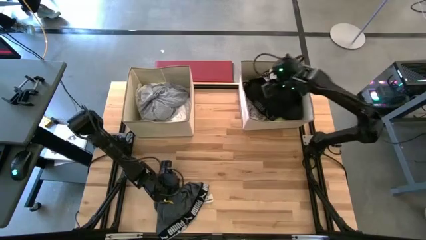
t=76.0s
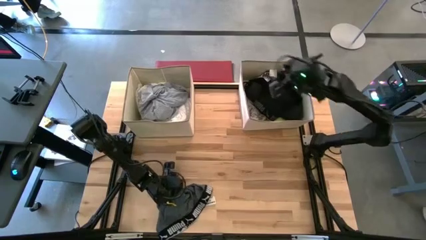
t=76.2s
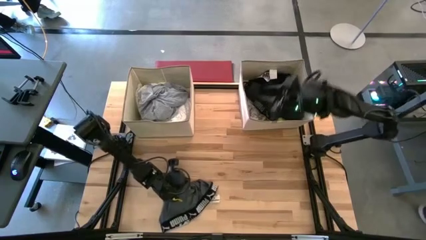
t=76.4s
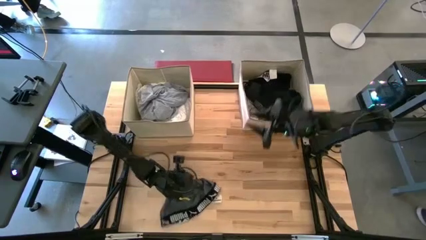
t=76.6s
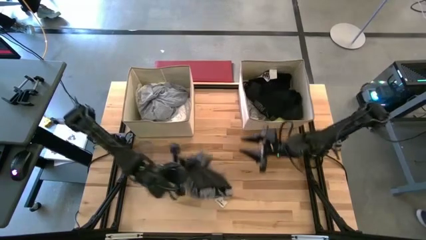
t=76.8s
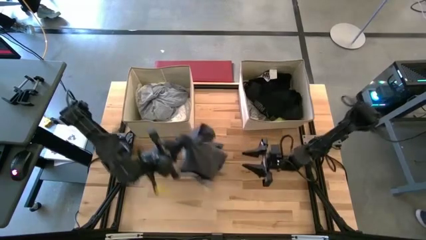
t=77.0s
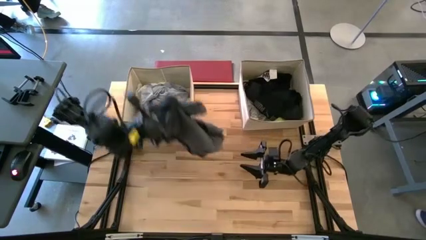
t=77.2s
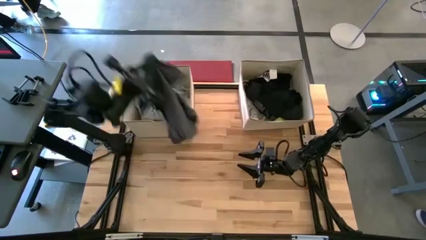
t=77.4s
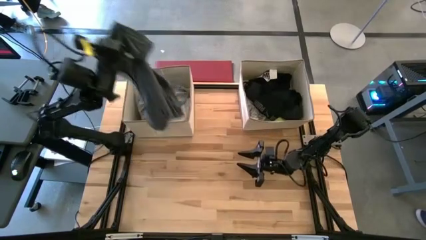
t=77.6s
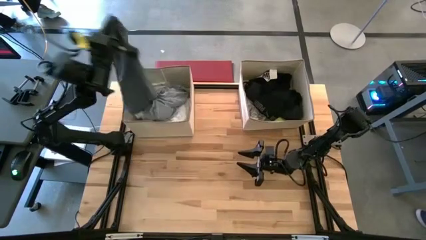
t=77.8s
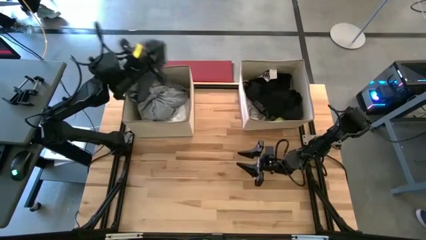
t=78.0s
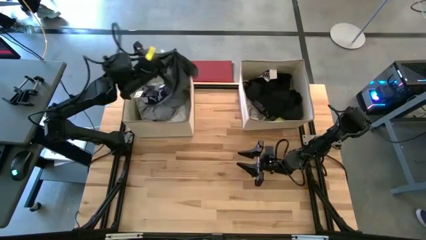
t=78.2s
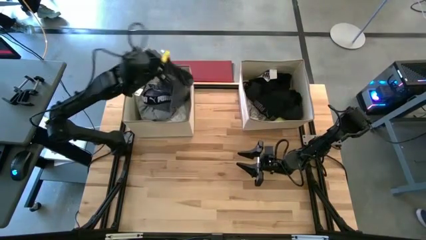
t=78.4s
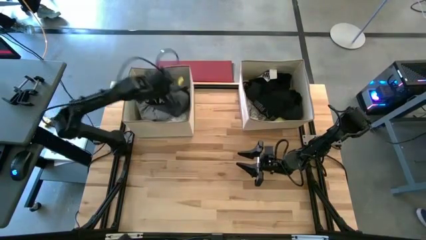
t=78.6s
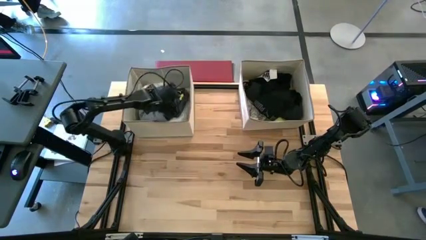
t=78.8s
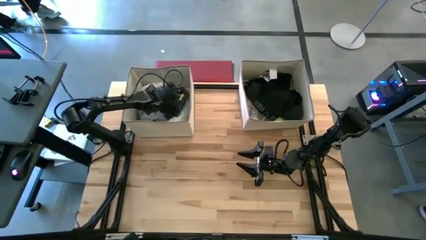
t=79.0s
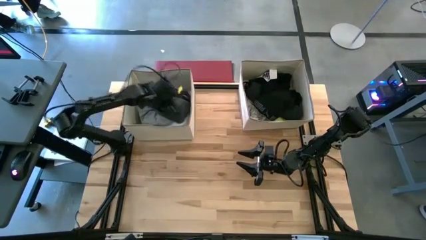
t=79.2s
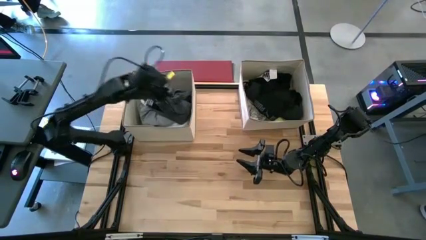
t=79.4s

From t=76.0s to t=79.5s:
Task: Sort clothes
Put the gray boxer into the left laundry organizer

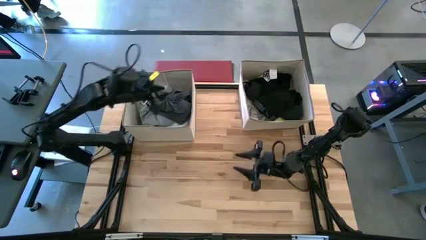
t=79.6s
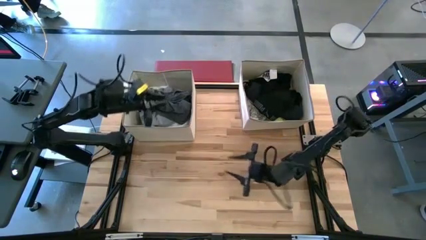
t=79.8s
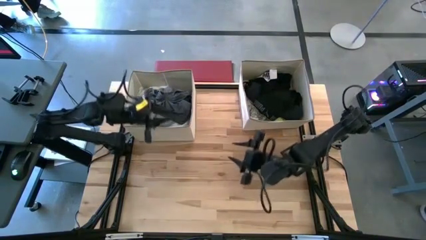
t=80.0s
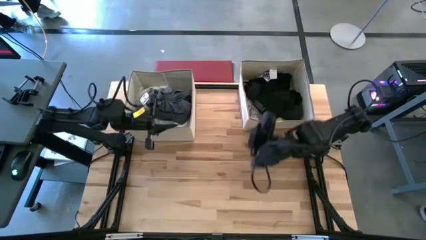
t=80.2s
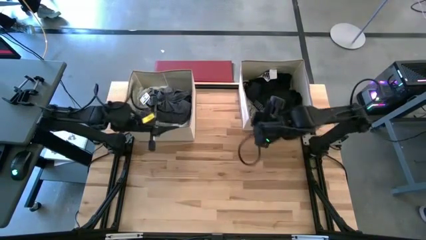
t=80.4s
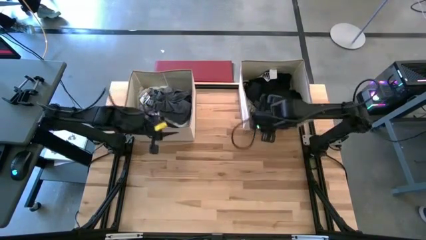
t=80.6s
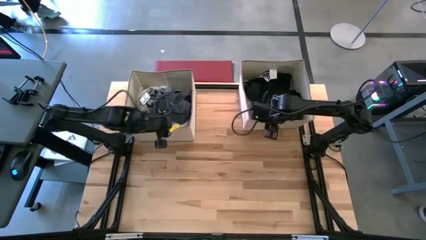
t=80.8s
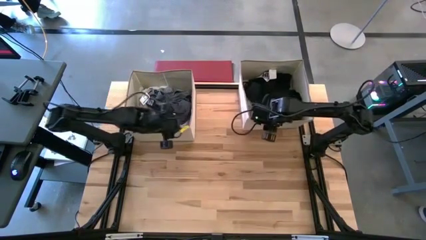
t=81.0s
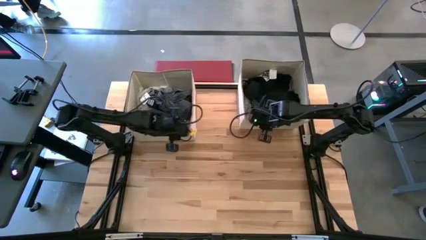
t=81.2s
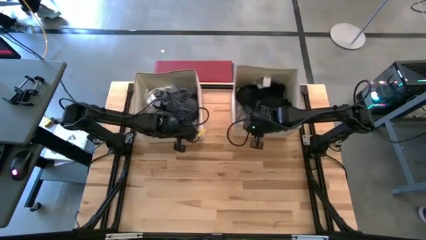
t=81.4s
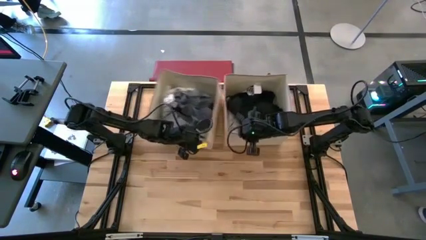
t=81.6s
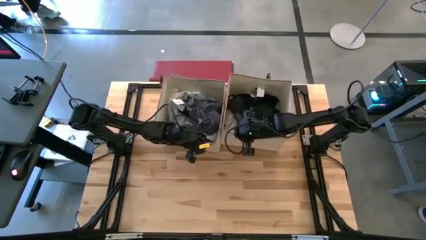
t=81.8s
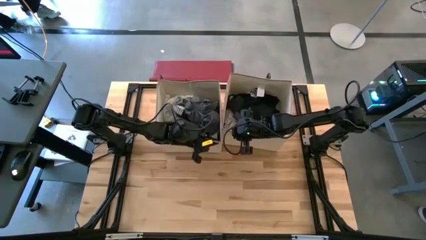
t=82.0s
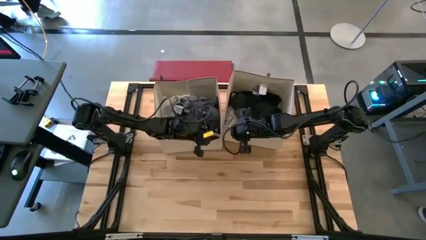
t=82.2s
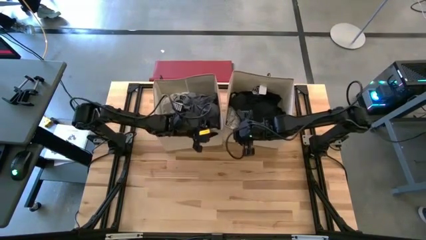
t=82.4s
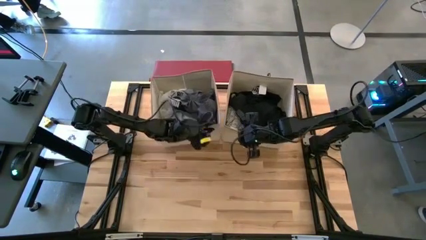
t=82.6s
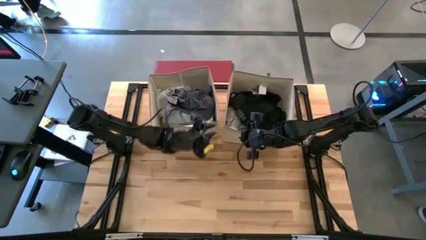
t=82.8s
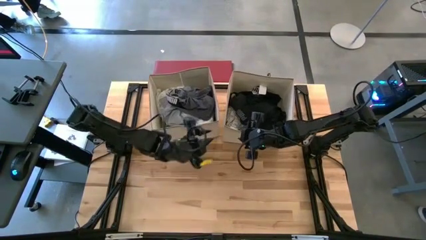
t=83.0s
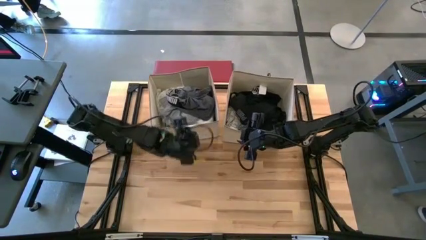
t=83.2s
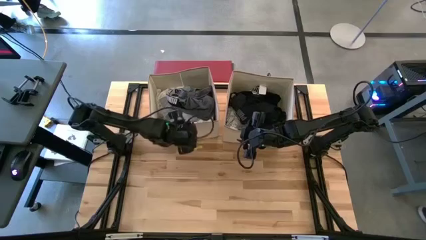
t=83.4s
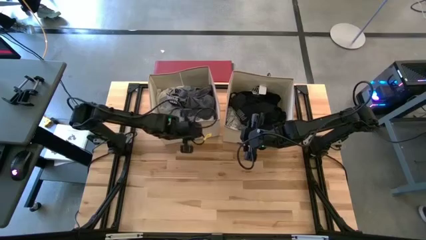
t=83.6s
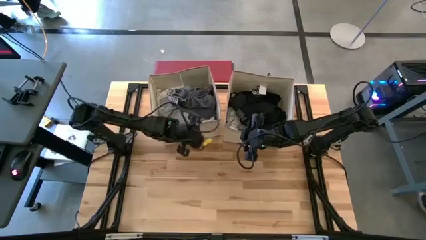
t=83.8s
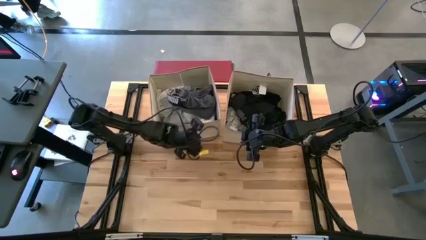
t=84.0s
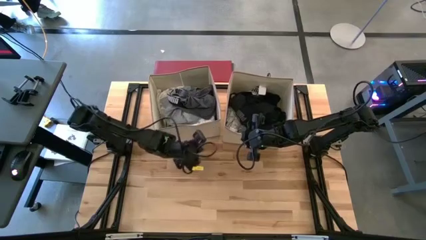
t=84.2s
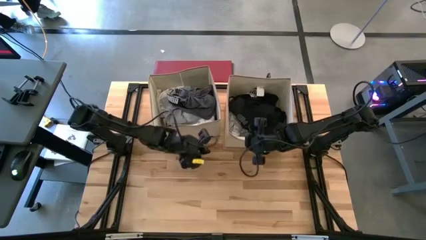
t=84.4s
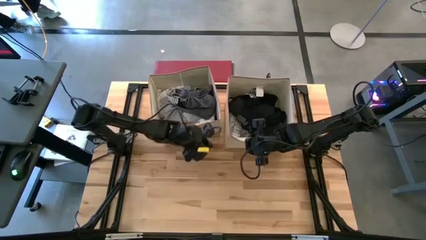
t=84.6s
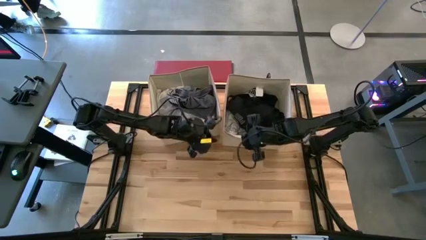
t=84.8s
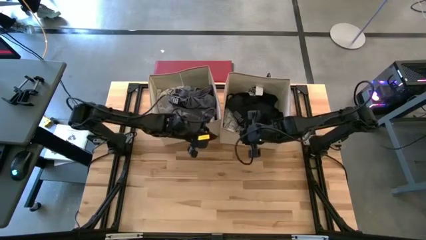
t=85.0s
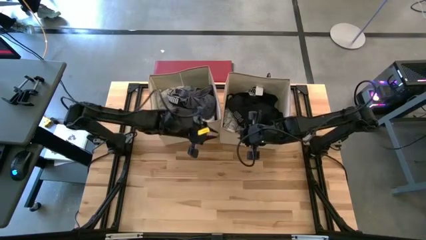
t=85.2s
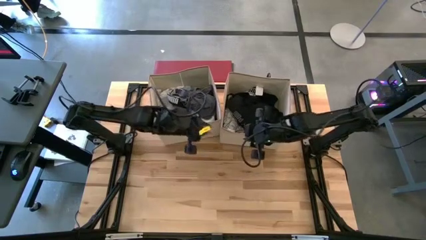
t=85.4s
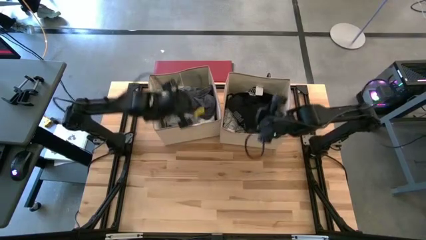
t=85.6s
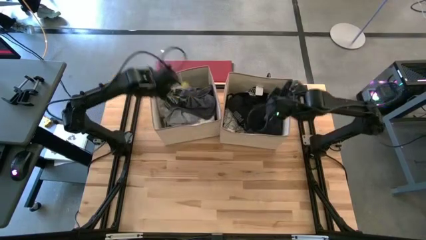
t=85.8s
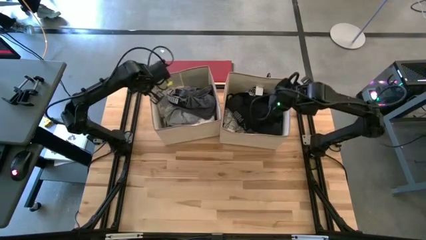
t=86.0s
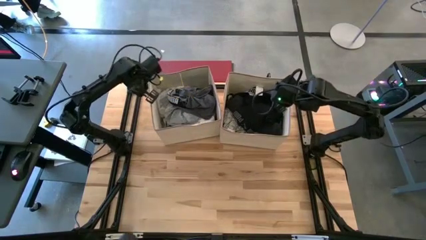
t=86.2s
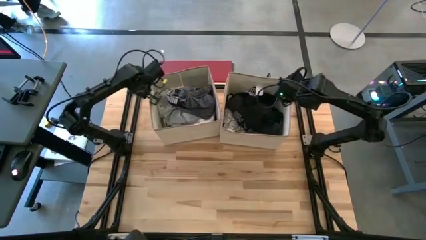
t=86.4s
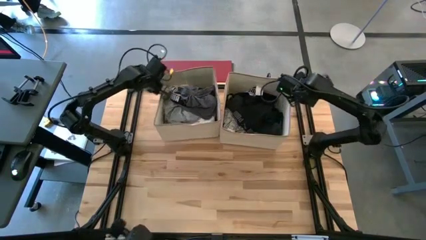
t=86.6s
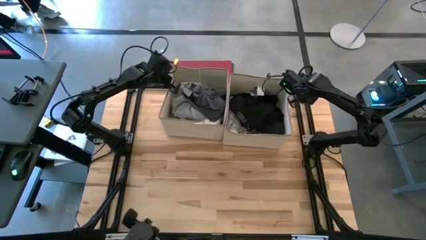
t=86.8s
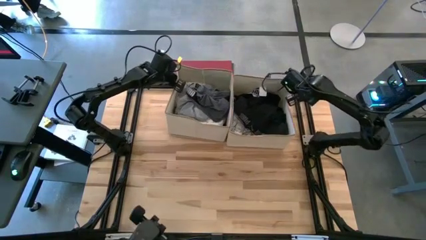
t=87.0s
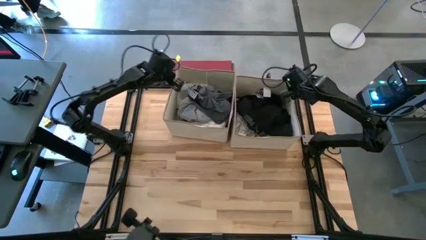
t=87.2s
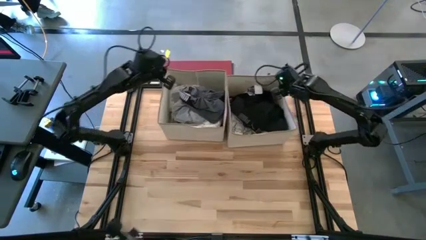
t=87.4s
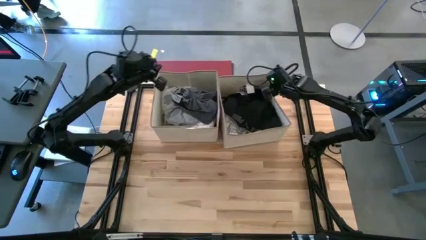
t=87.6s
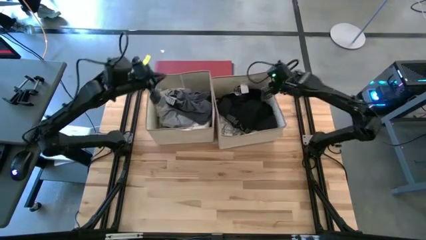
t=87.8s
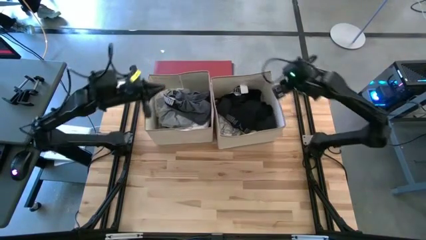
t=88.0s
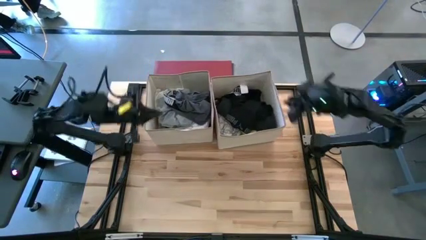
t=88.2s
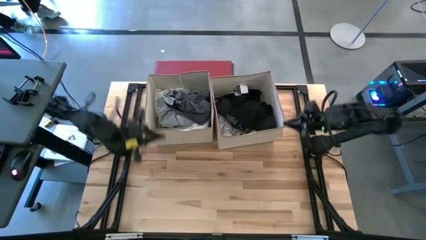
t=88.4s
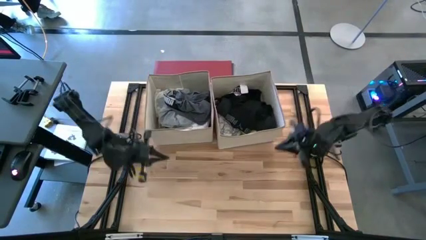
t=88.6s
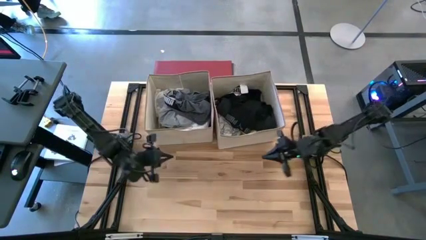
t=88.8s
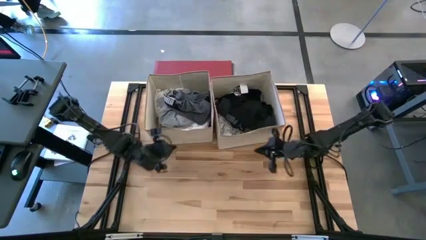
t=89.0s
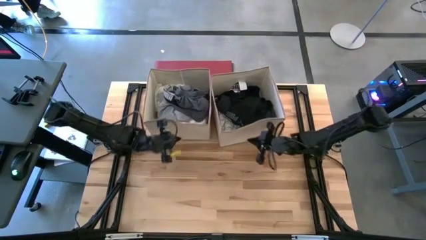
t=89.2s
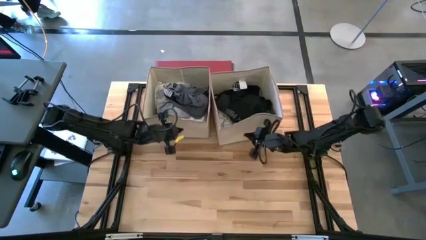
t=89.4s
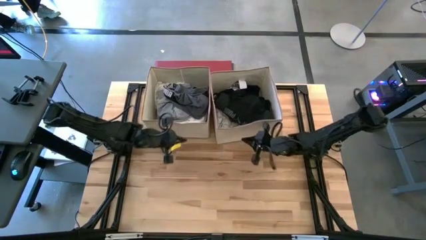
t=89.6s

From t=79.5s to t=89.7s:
Adjust the laundry organizers
